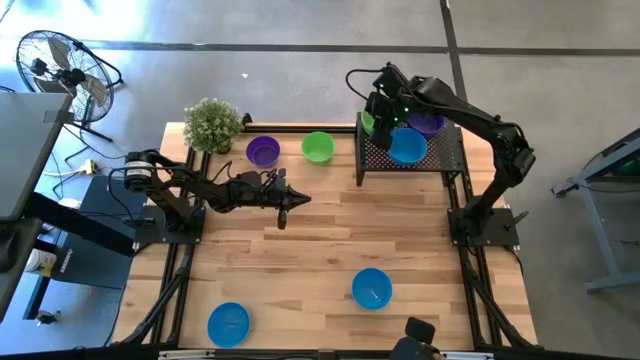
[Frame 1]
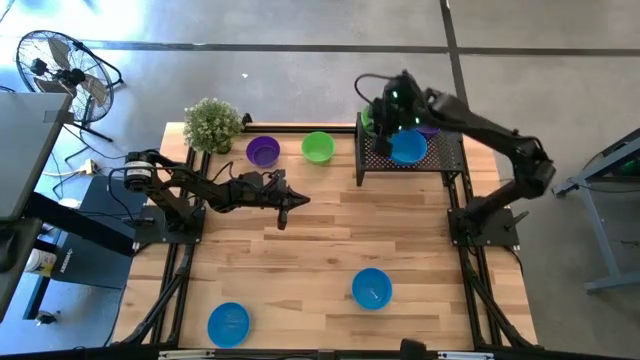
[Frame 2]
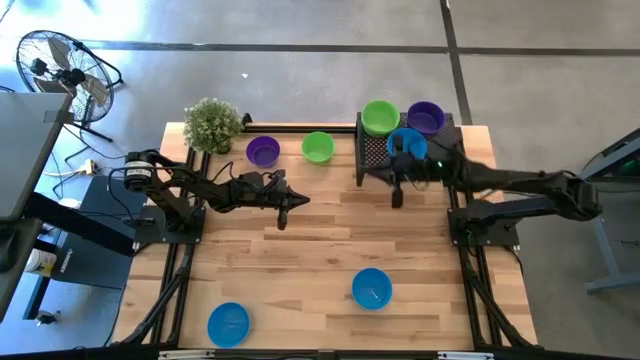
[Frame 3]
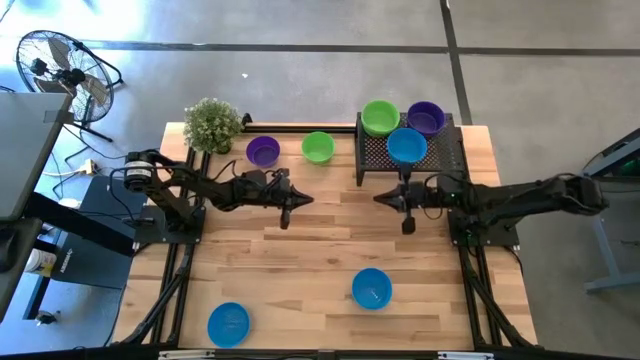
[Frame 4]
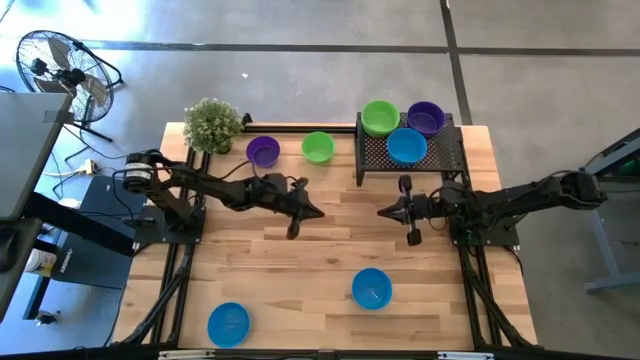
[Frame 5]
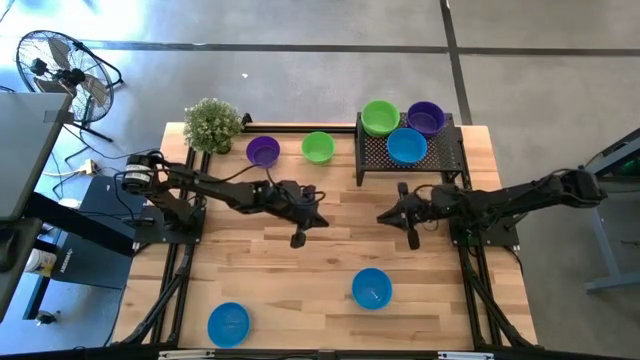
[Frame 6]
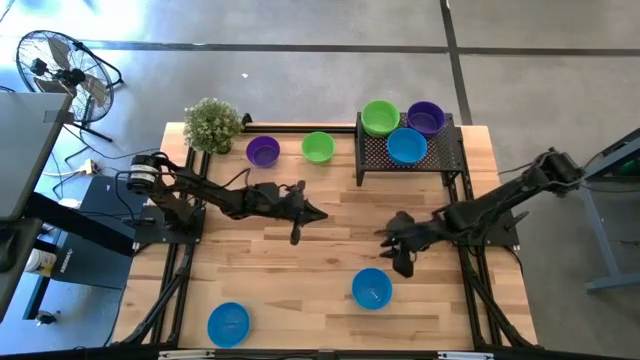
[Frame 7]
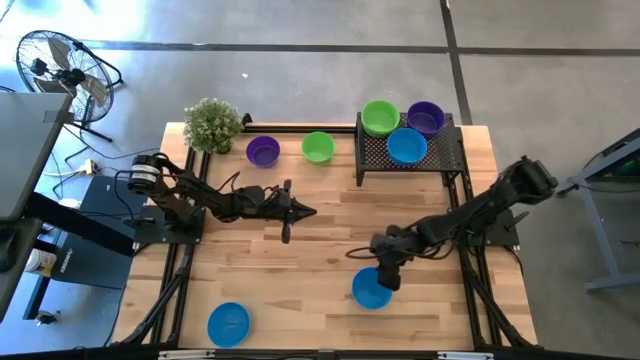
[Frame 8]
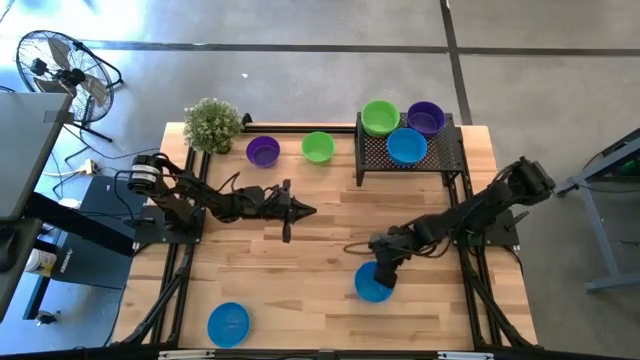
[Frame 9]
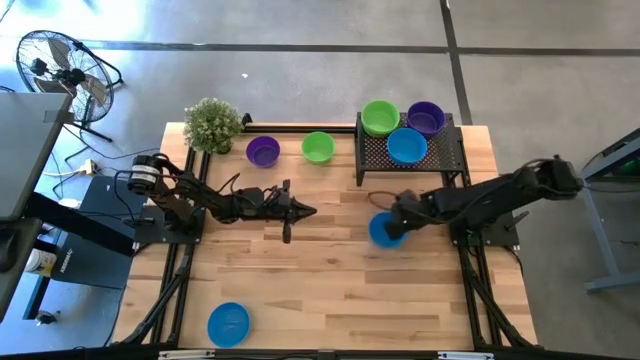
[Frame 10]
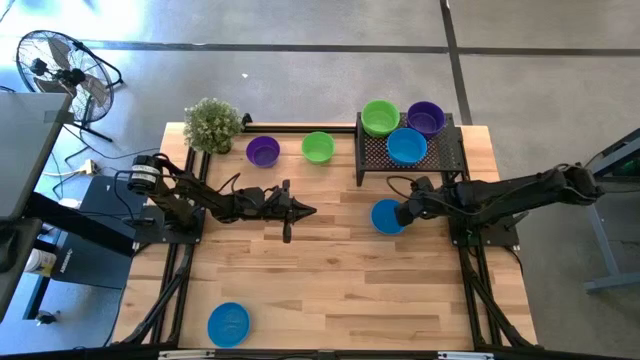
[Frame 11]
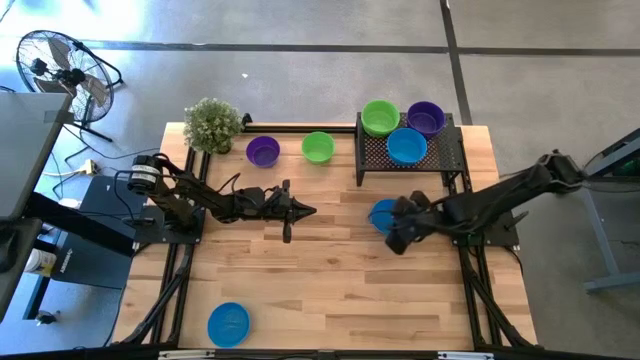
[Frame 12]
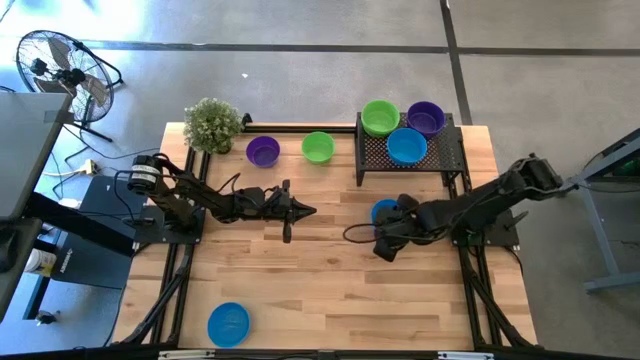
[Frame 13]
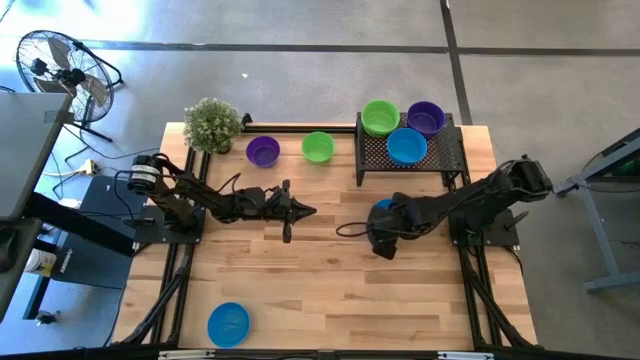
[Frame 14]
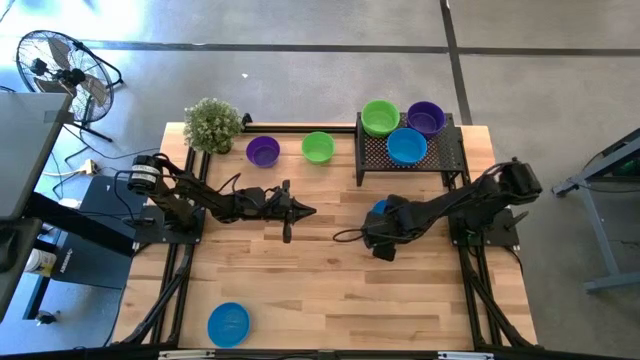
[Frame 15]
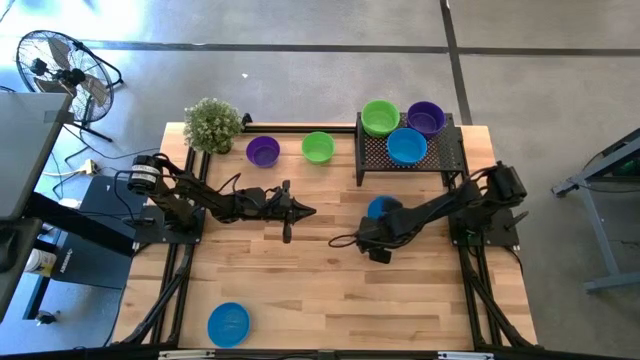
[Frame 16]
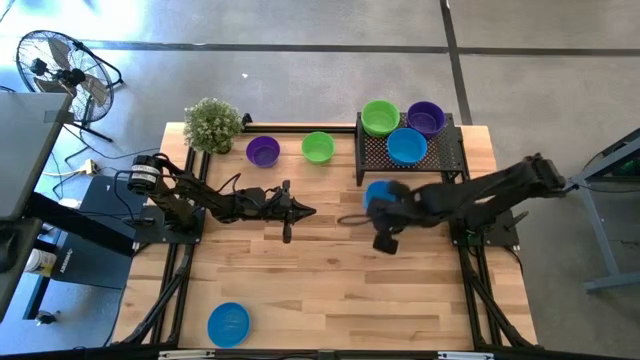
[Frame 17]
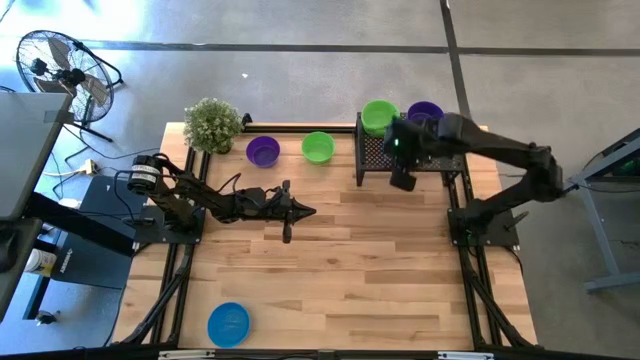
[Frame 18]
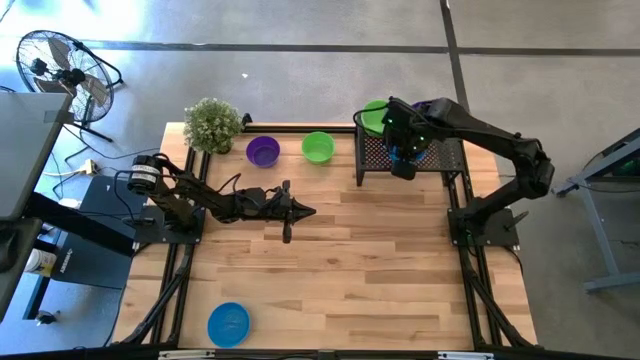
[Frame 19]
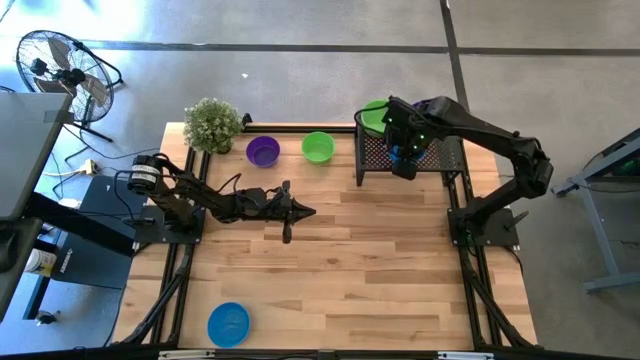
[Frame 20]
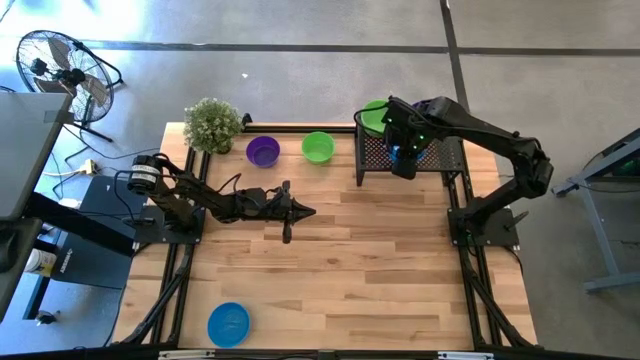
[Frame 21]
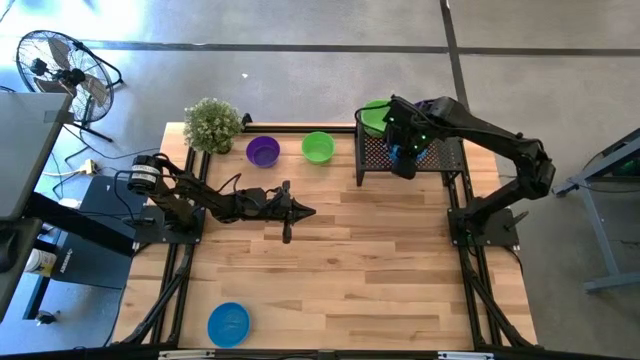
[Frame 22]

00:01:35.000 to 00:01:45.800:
Task: Pick & Place Mini bowls
Stack the blue bowl on the other blue bowls on the shelf

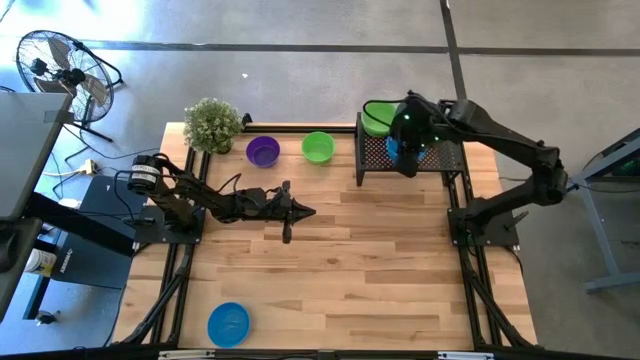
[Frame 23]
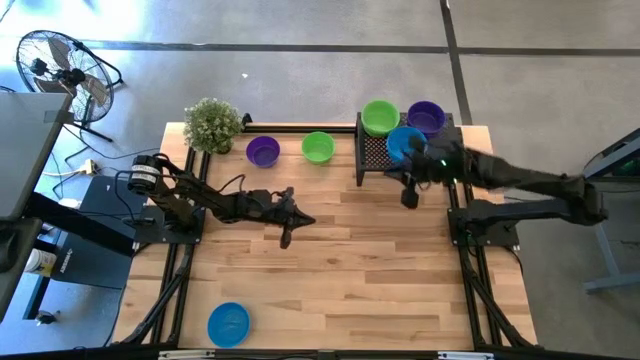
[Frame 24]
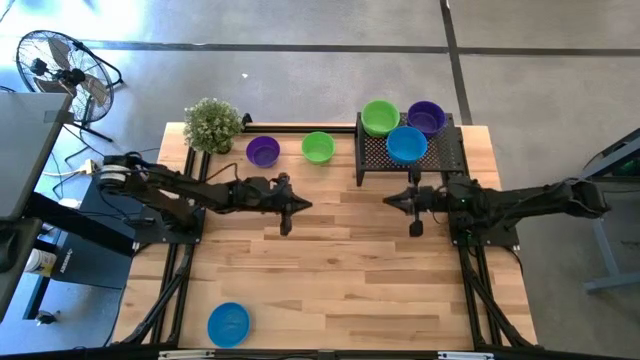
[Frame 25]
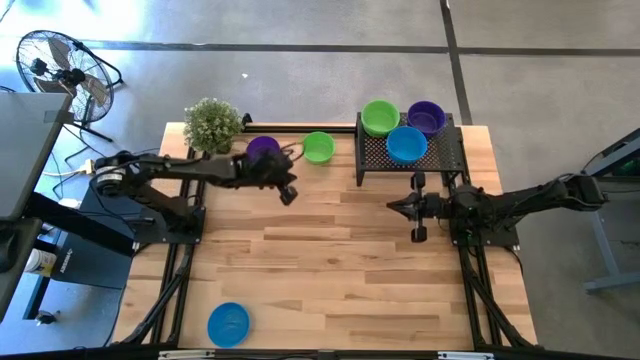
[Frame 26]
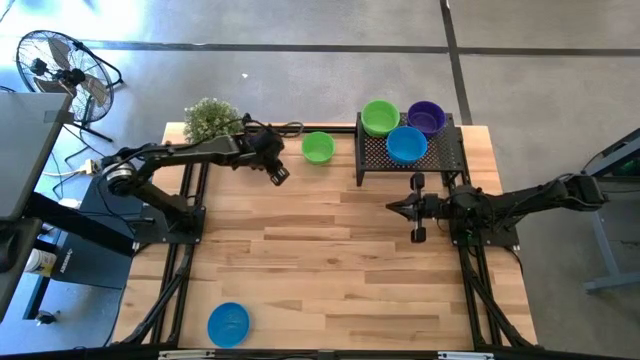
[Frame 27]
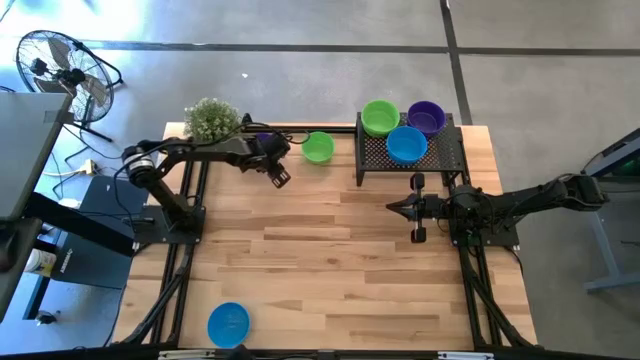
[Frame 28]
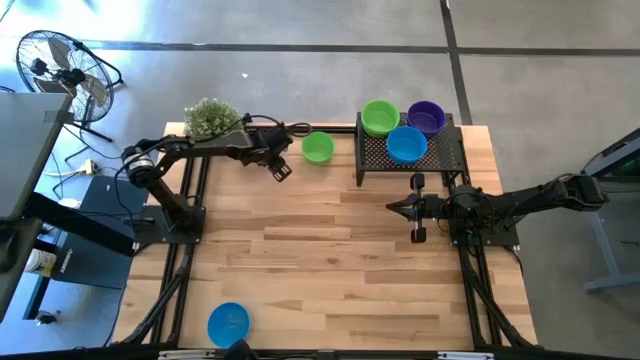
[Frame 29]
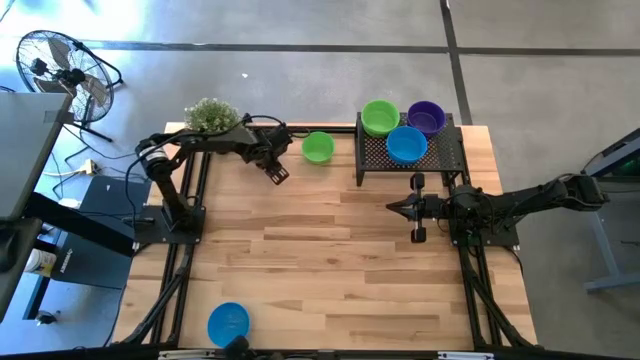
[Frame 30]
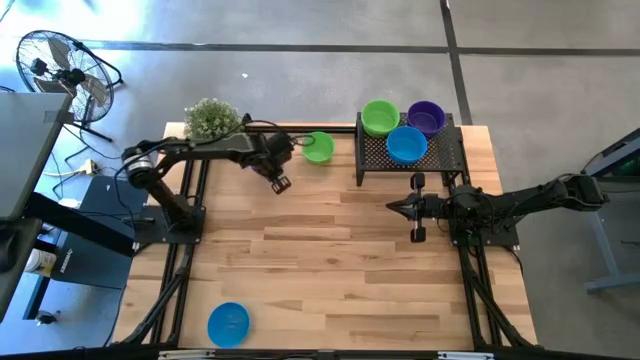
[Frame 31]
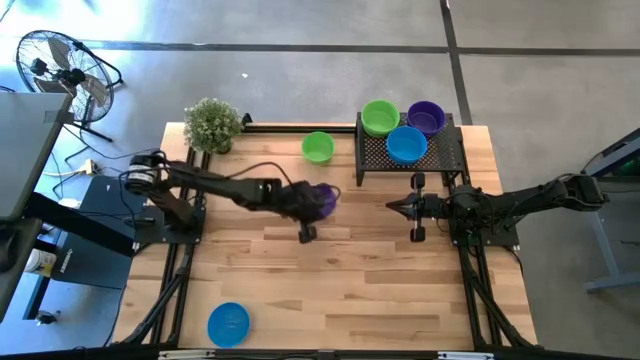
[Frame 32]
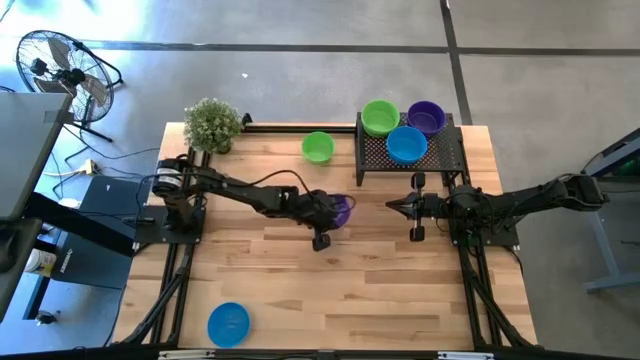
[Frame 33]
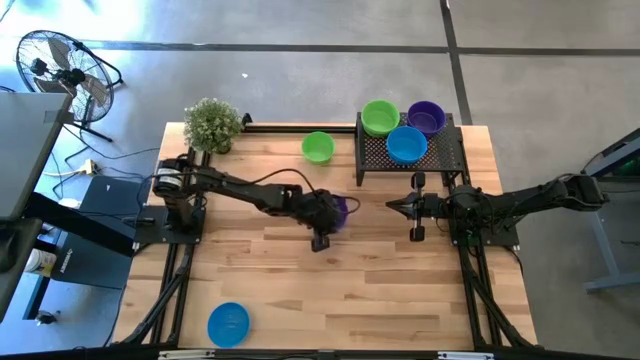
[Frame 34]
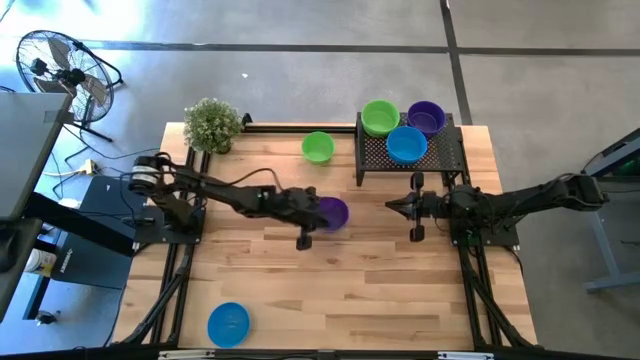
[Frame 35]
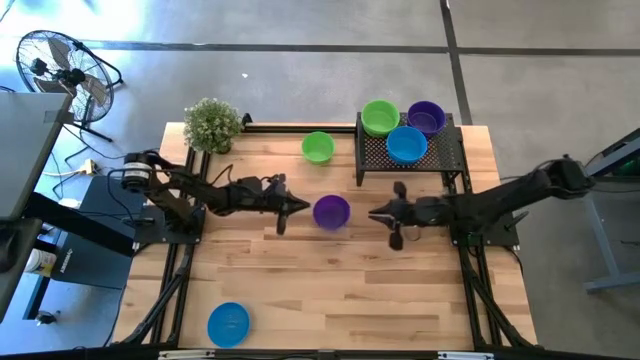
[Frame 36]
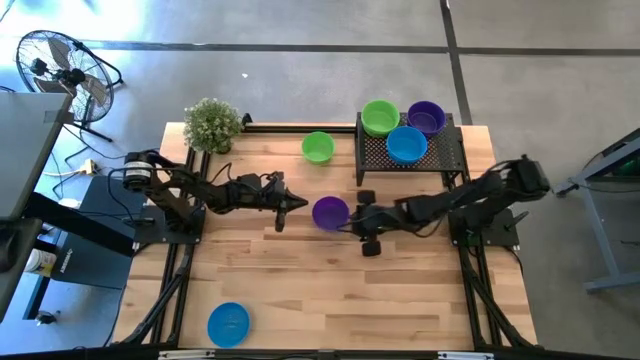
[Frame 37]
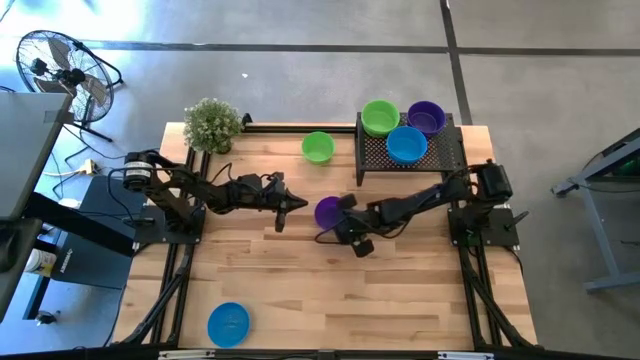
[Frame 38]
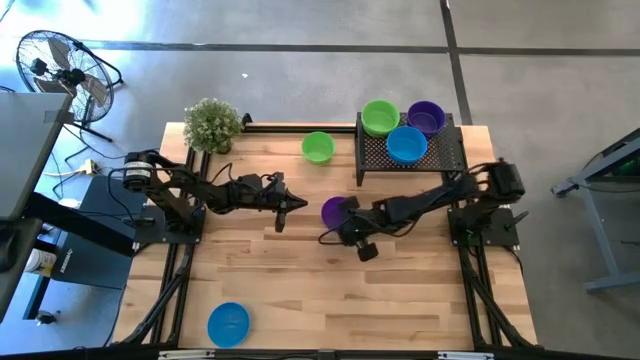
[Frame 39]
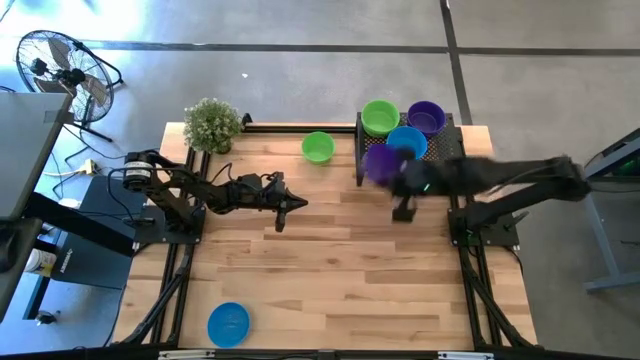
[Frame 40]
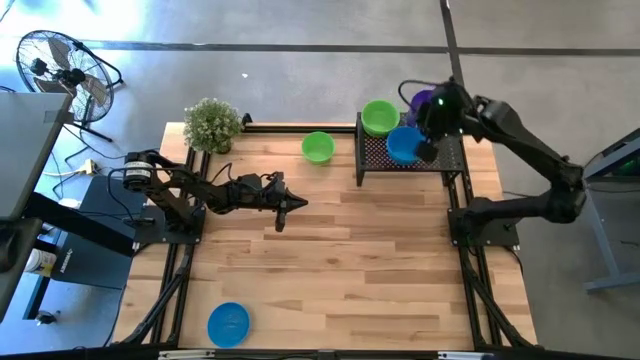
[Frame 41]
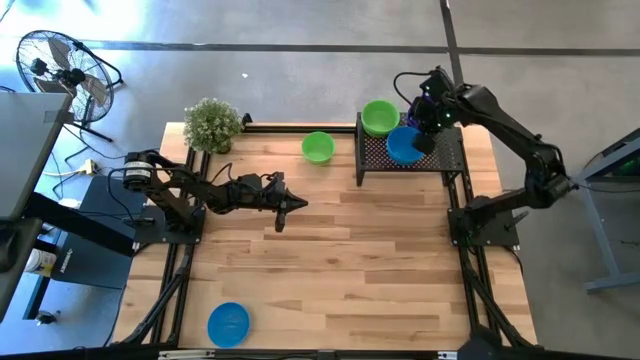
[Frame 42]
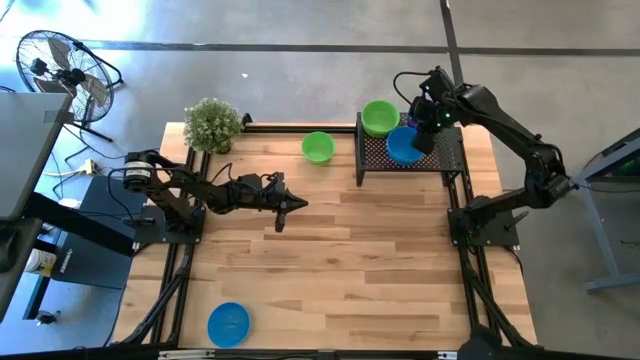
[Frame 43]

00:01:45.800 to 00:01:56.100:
Stack the purple bowl on the other purple bowls on the shelf
